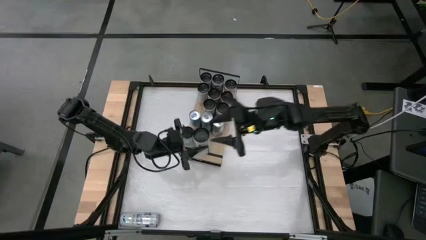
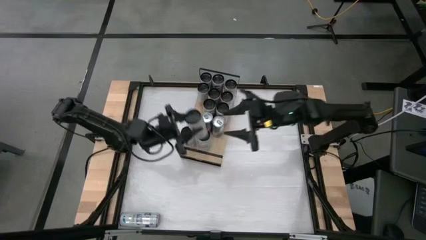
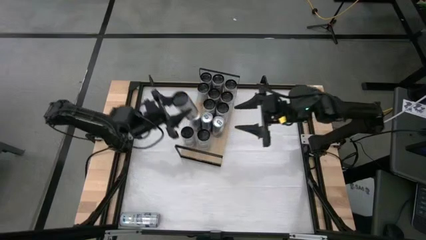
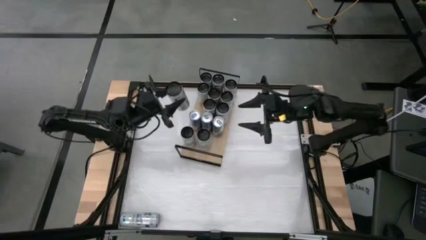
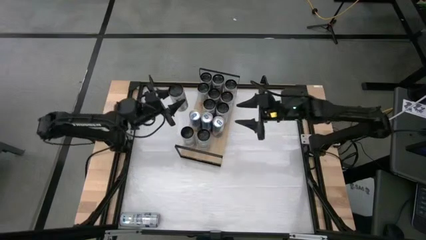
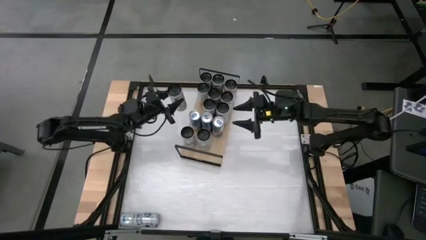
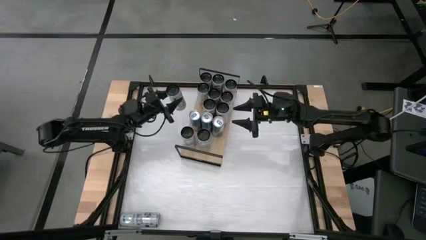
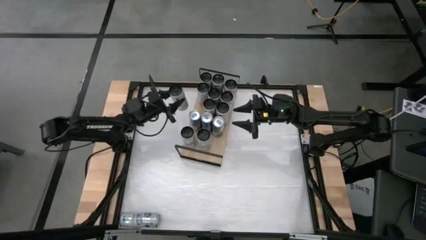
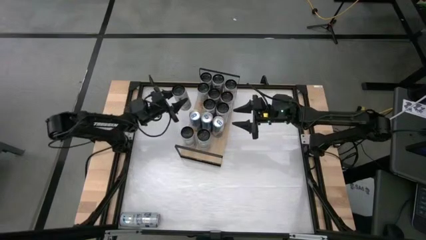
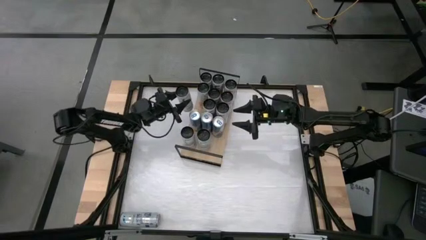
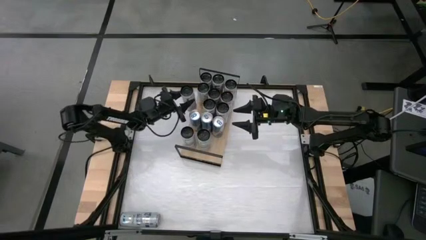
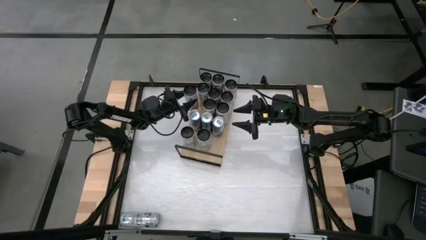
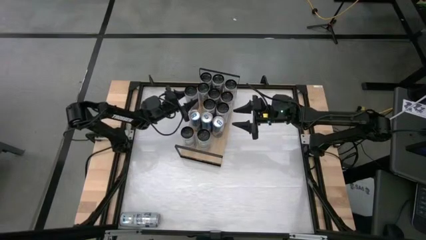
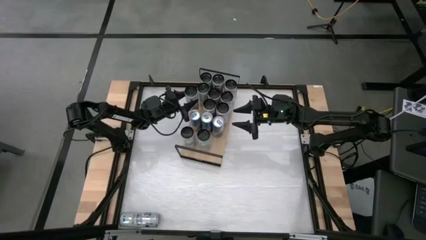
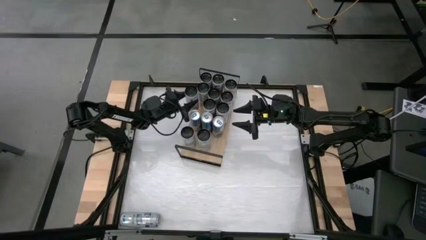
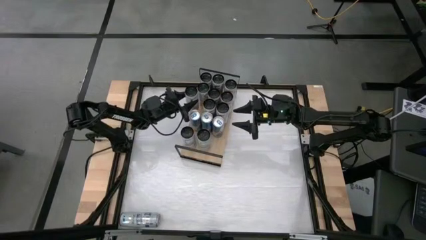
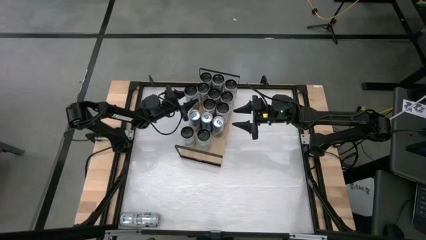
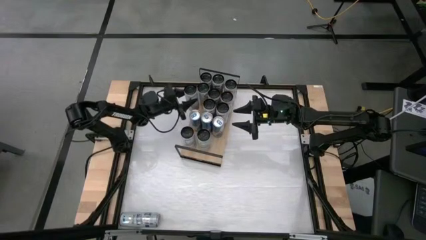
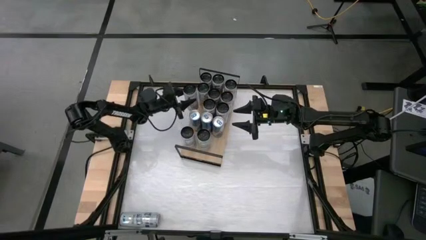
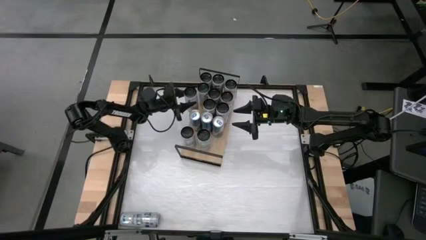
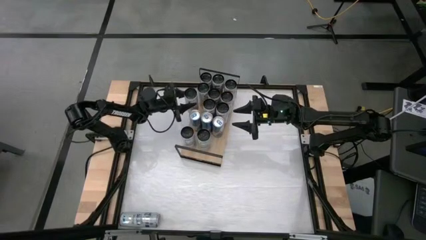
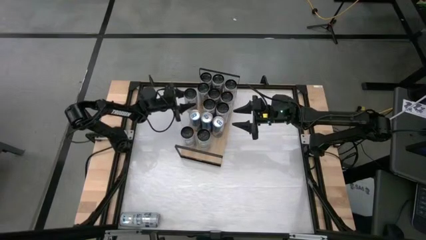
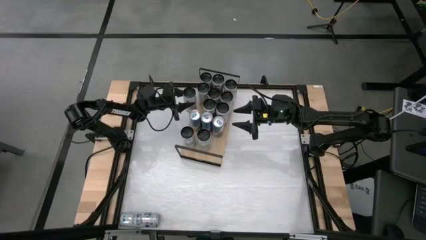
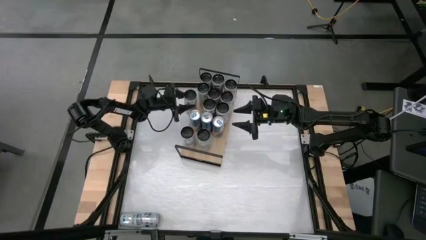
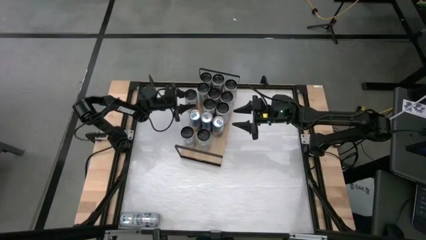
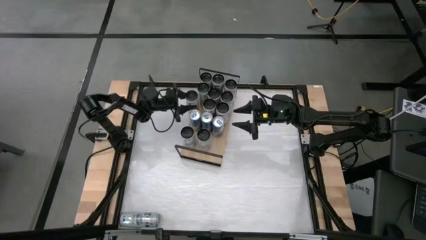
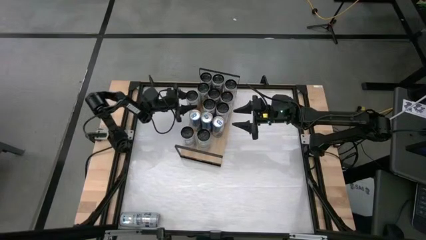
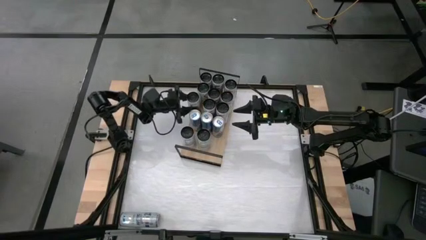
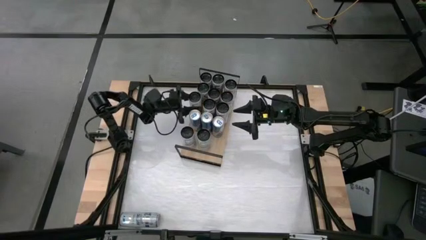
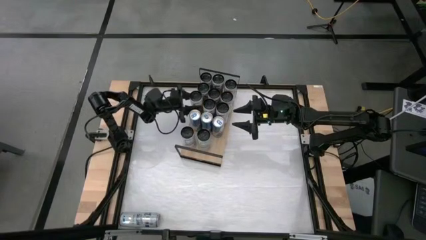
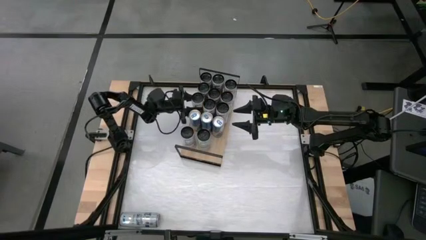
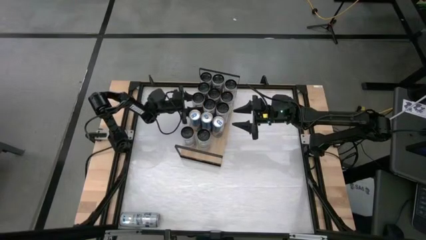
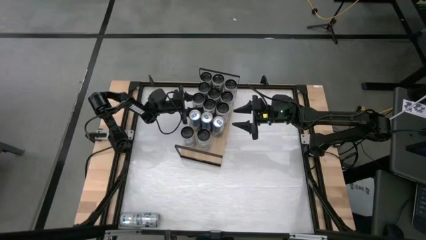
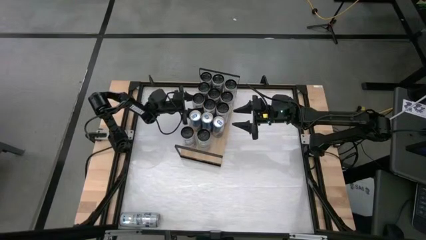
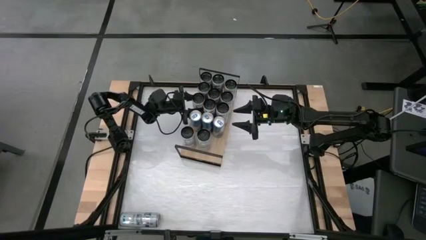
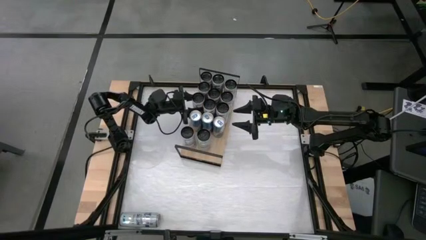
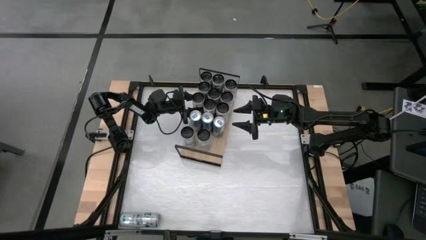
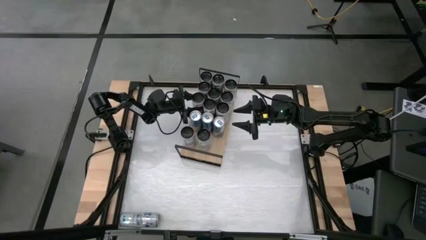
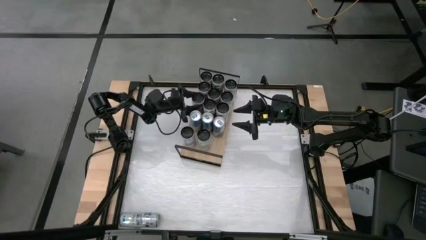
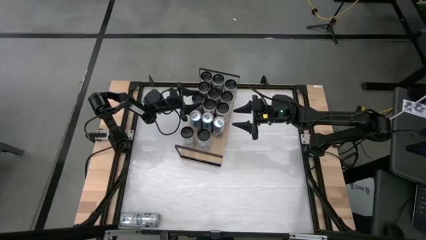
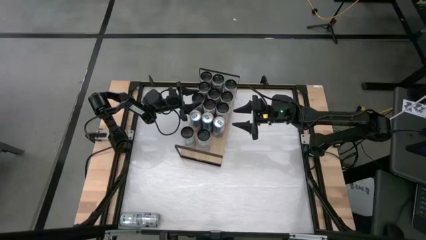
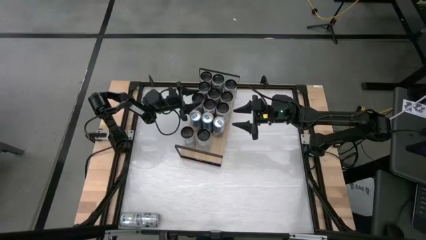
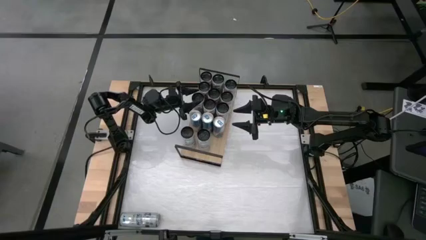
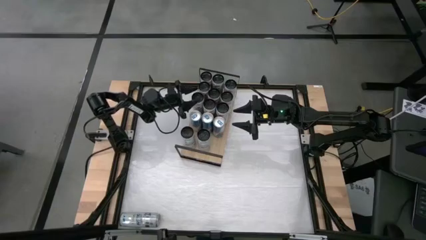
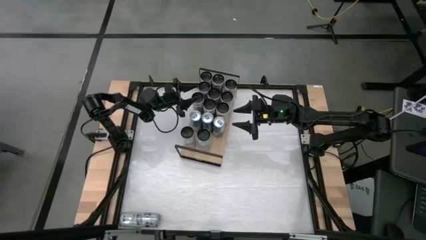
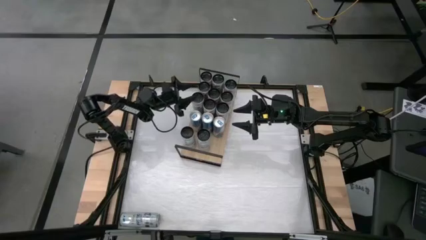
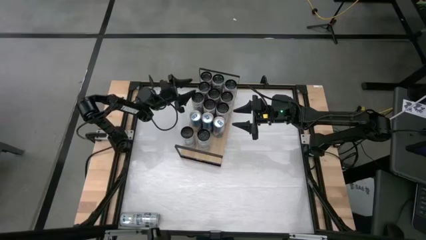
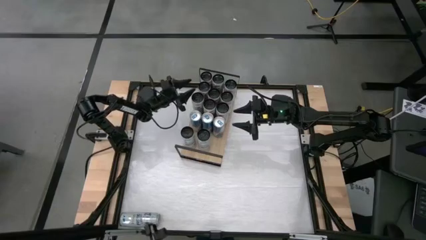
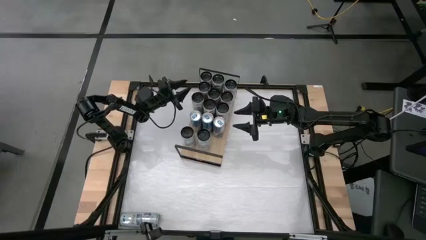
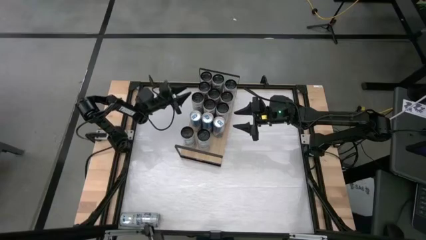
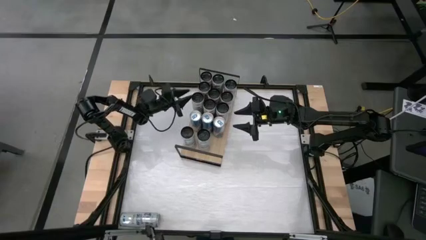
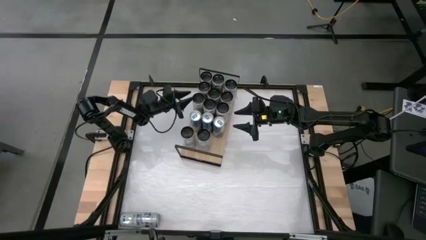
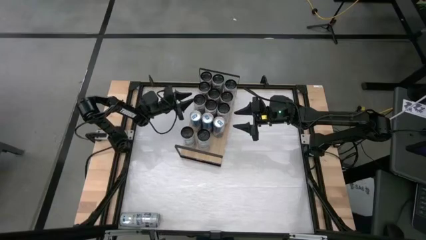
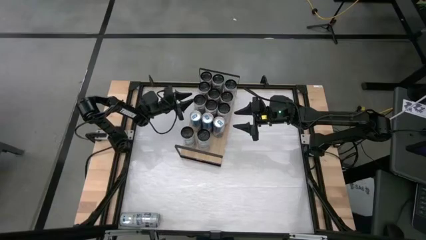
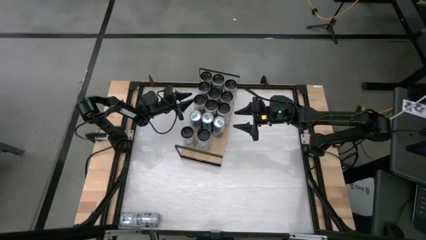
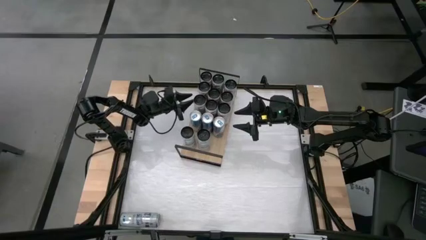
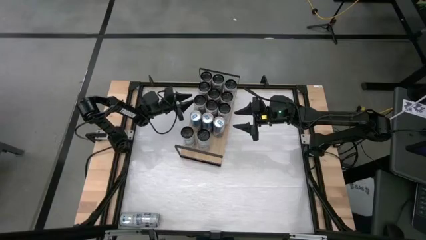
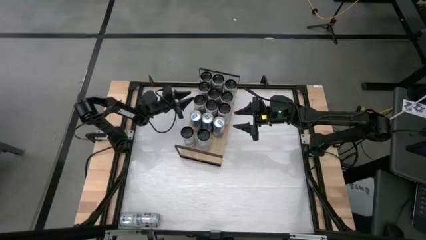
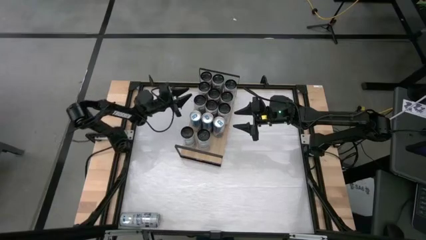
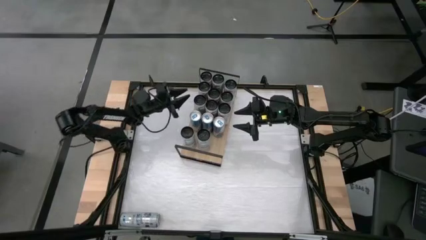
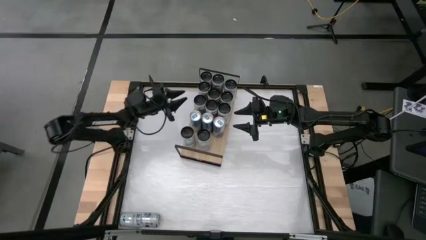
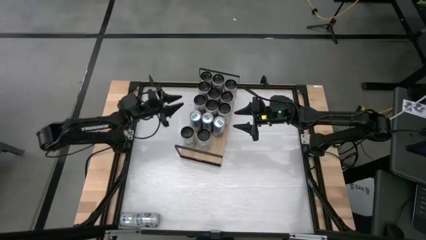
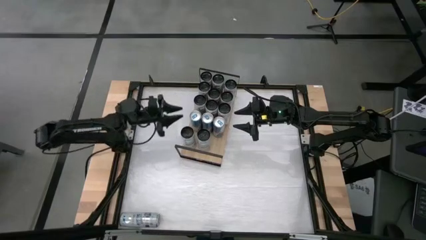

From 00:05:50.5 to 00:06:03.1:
Task: Place canned beverage on shelf
Put the orange soda can on the shelf aligned with the other orange soda can

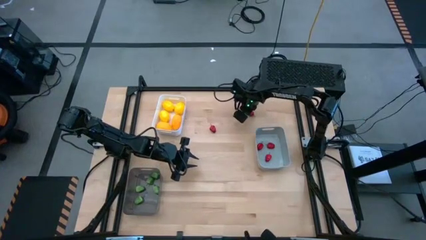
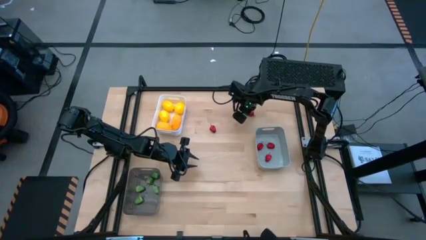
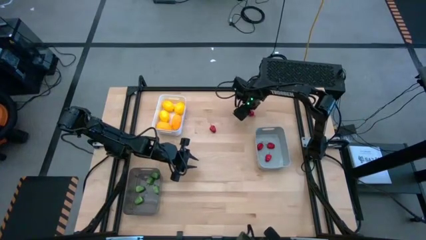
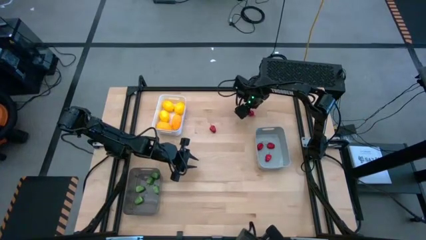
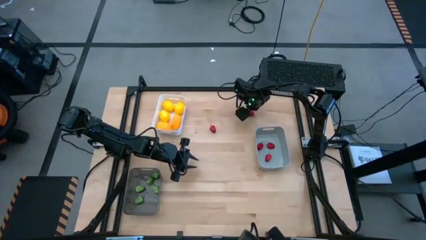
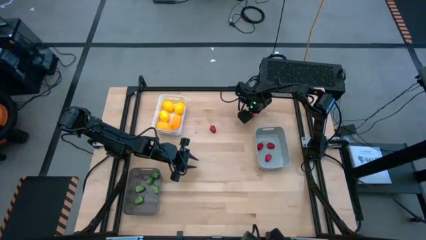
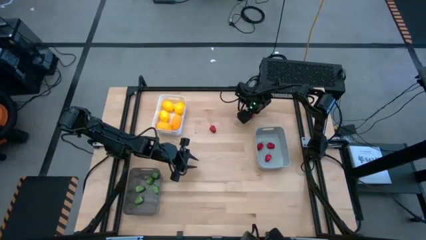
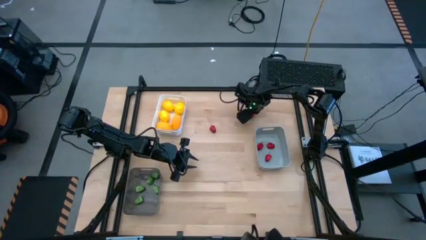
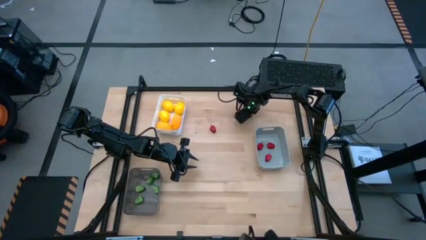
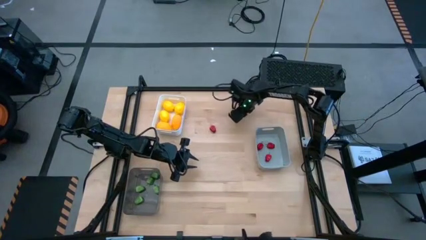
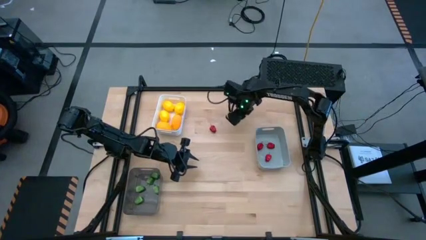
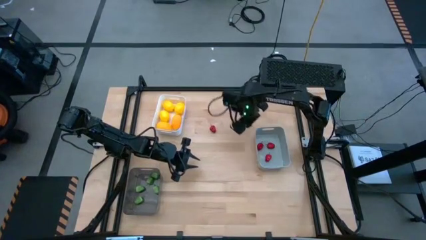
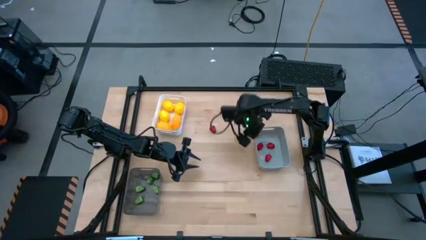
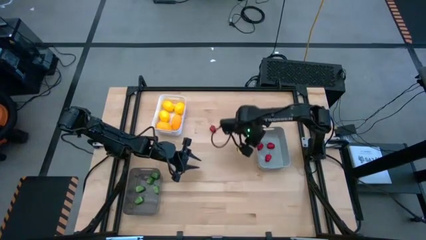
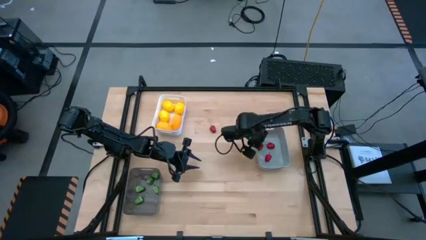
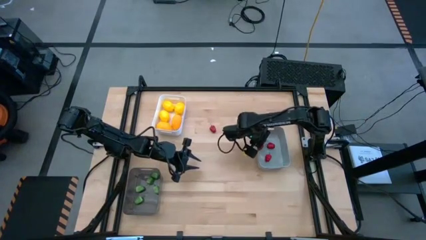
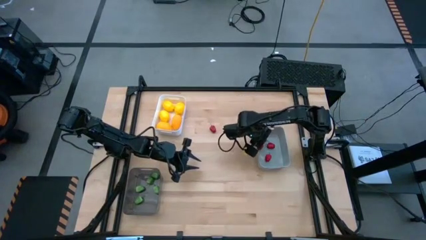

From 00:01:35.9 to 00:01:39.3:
Task: Sort produce into baskets
Put the right red chili pepper into the gray bin
